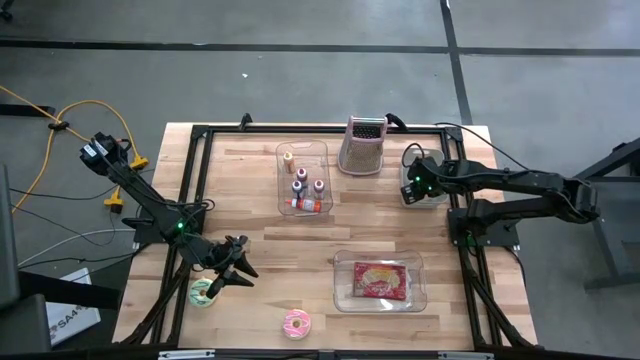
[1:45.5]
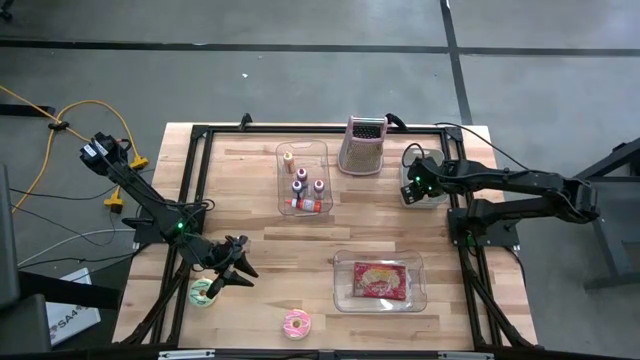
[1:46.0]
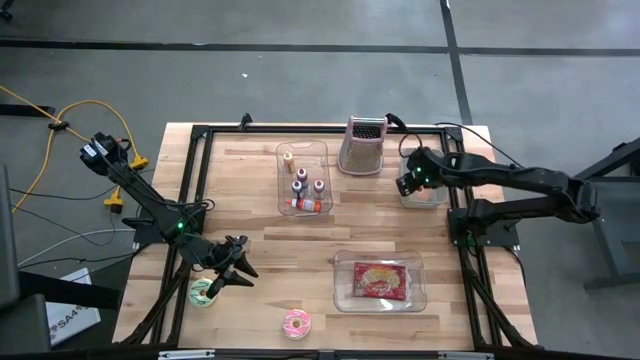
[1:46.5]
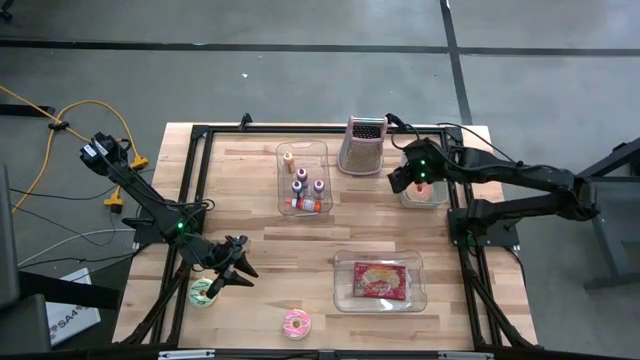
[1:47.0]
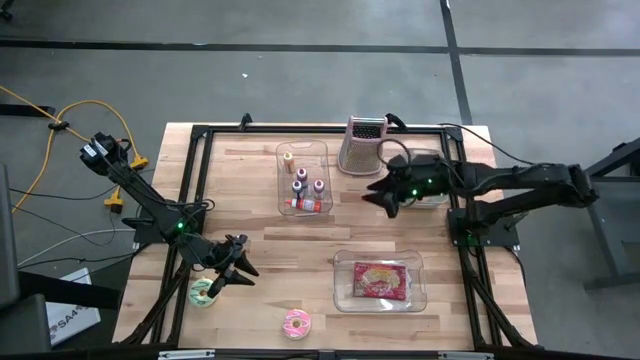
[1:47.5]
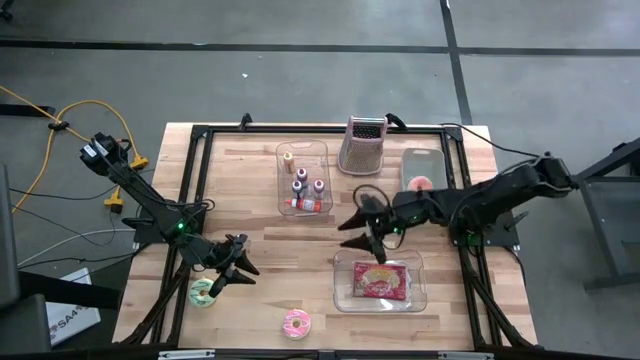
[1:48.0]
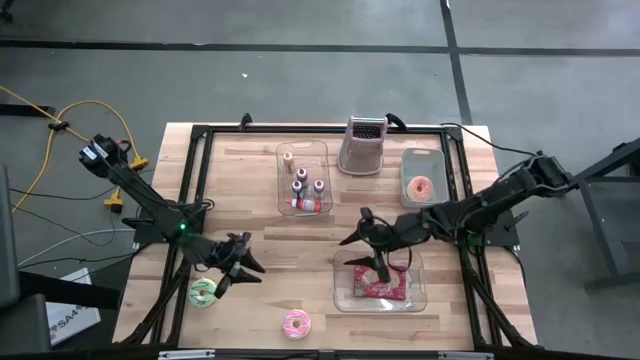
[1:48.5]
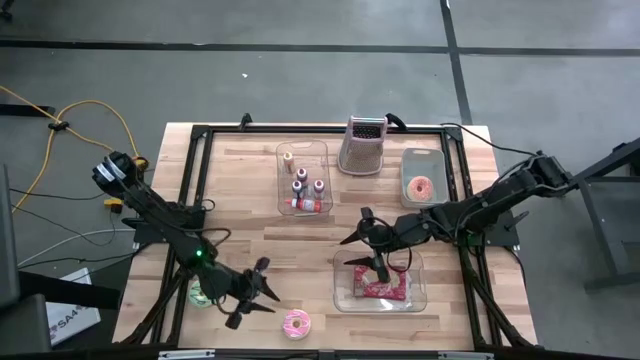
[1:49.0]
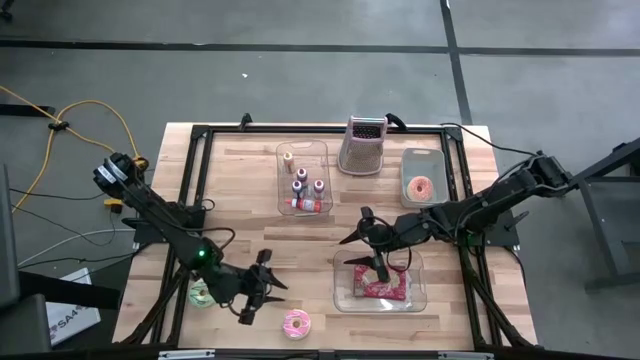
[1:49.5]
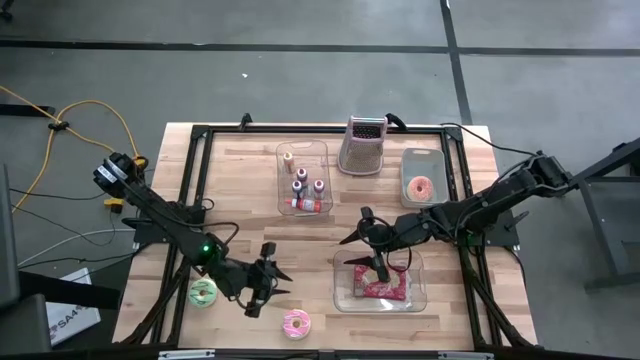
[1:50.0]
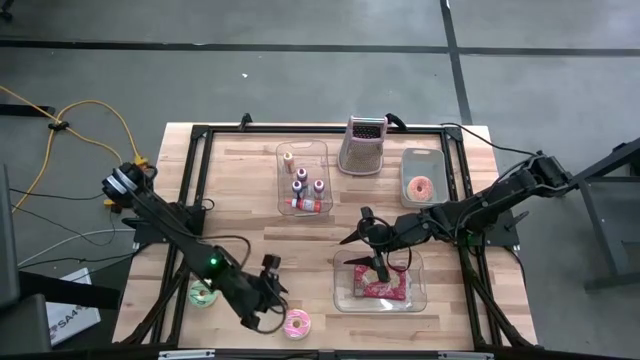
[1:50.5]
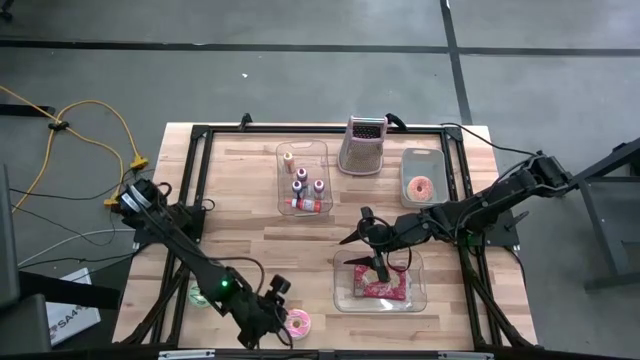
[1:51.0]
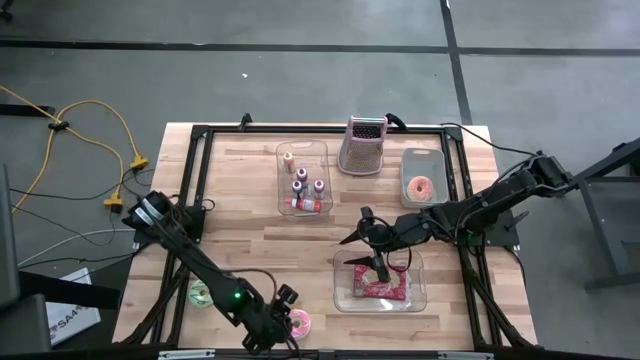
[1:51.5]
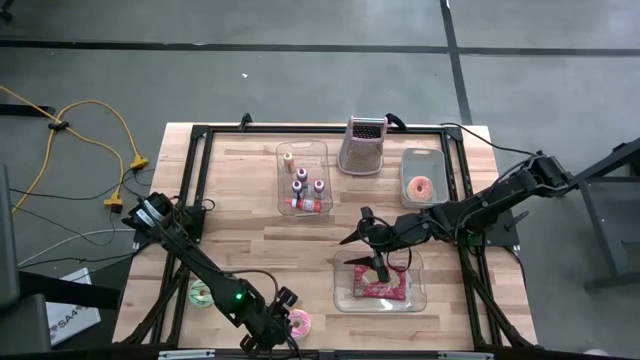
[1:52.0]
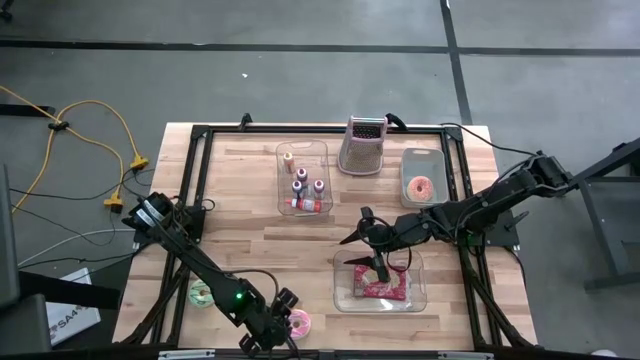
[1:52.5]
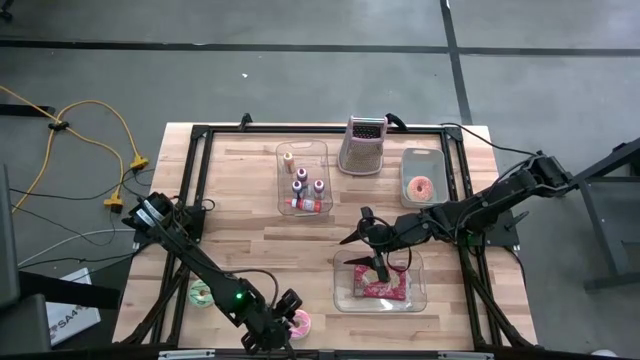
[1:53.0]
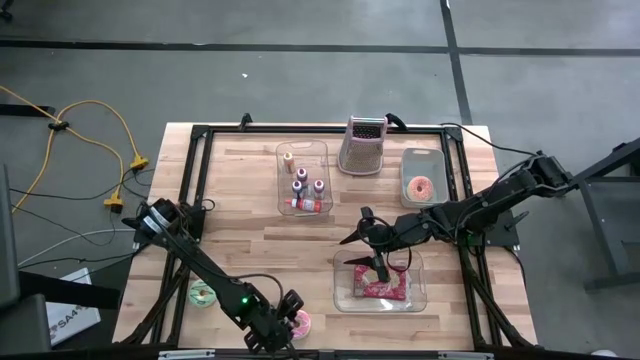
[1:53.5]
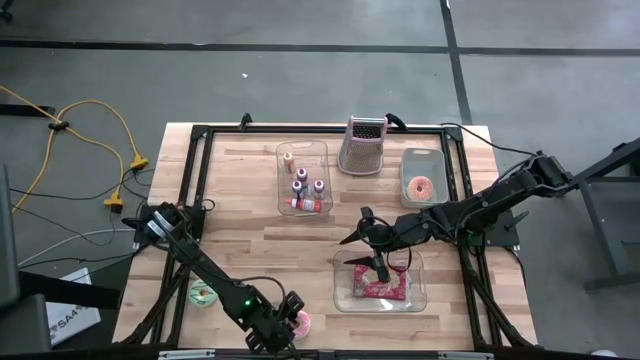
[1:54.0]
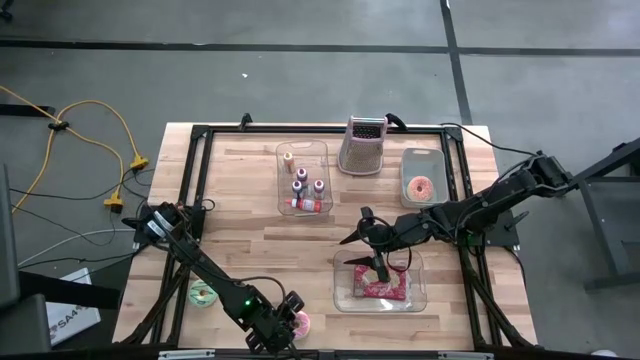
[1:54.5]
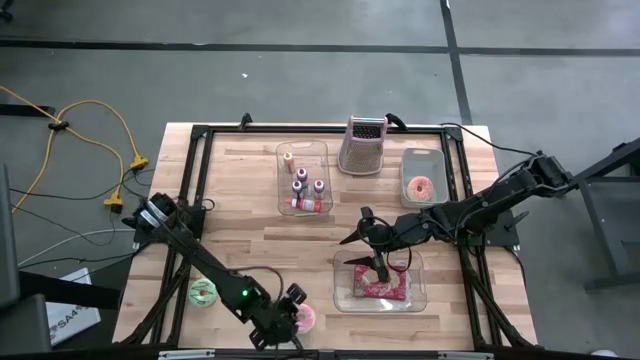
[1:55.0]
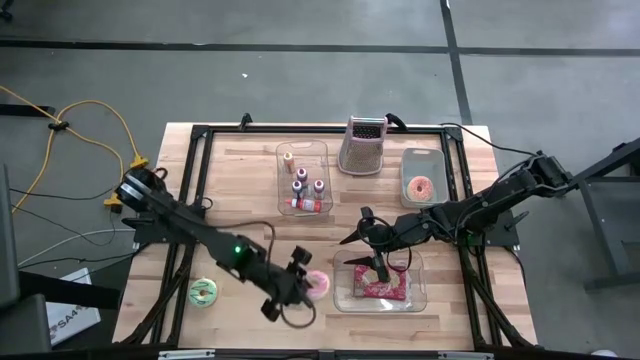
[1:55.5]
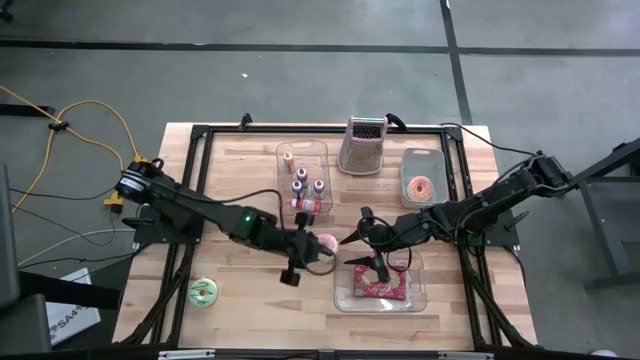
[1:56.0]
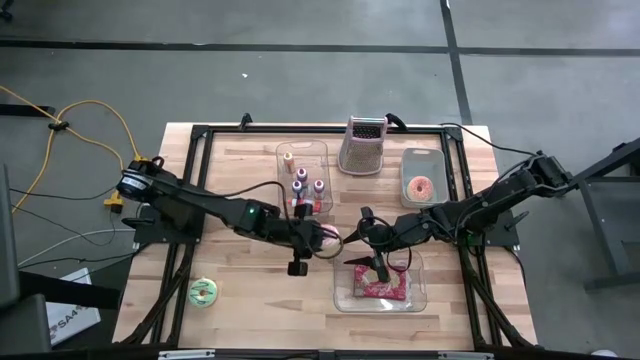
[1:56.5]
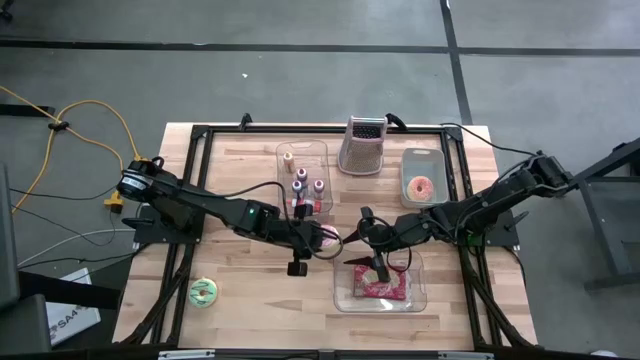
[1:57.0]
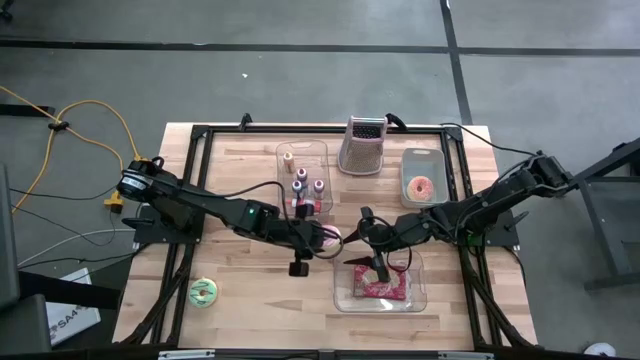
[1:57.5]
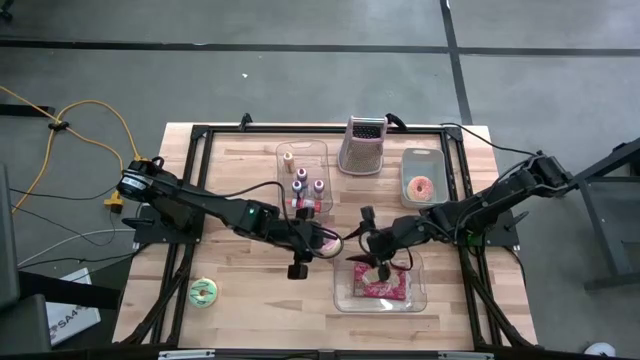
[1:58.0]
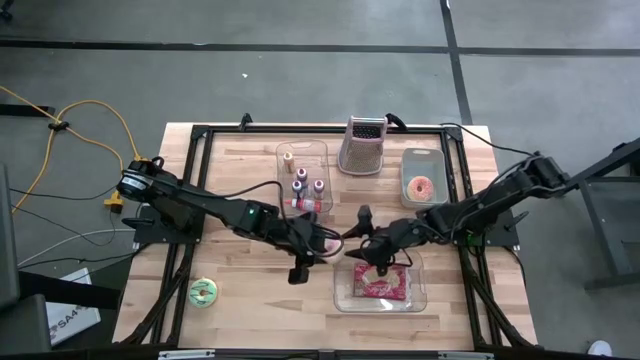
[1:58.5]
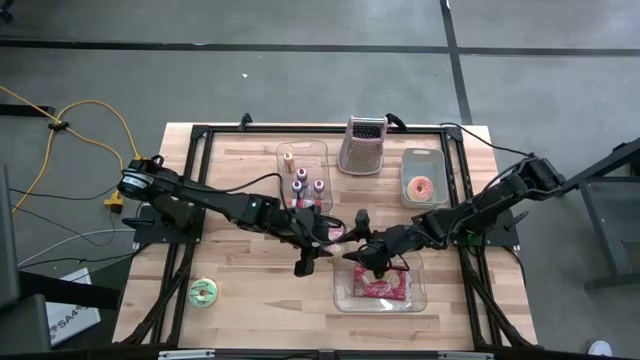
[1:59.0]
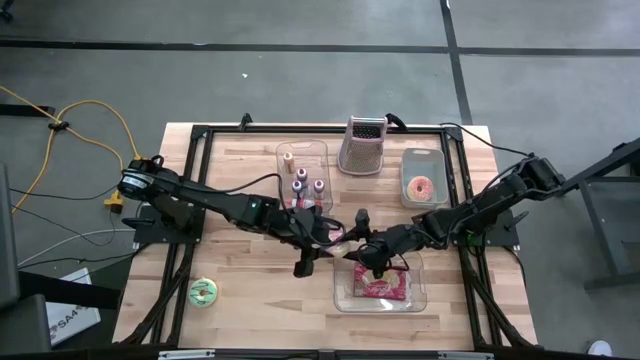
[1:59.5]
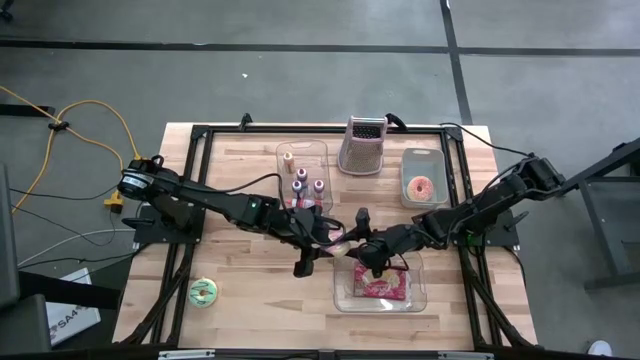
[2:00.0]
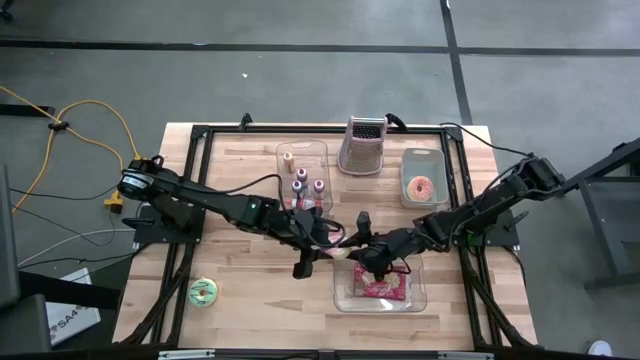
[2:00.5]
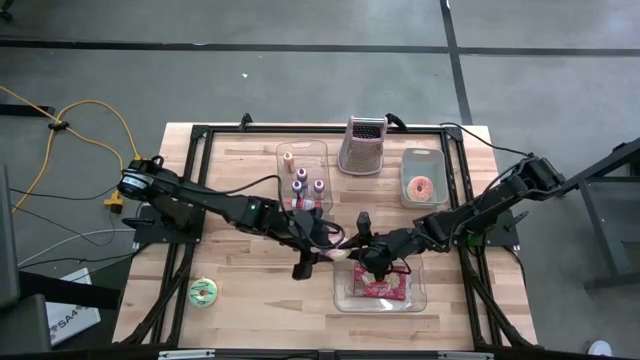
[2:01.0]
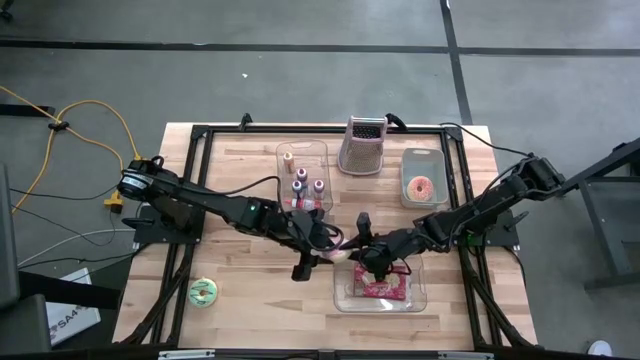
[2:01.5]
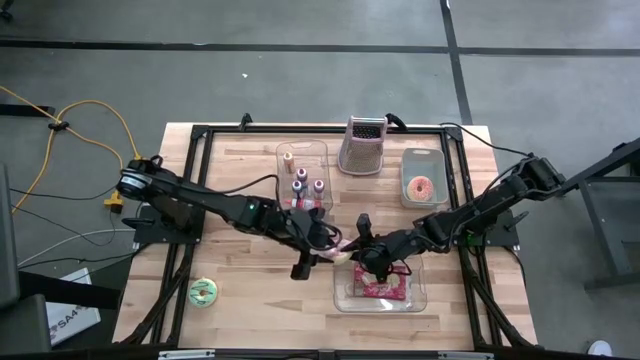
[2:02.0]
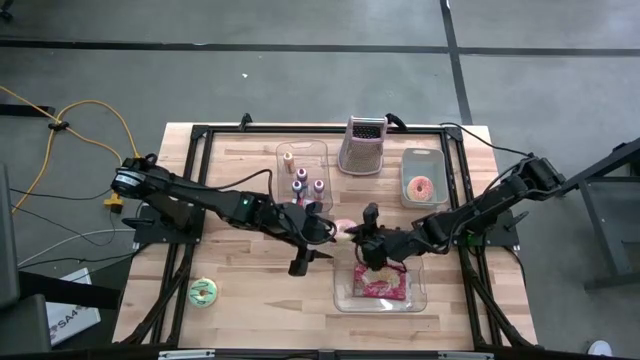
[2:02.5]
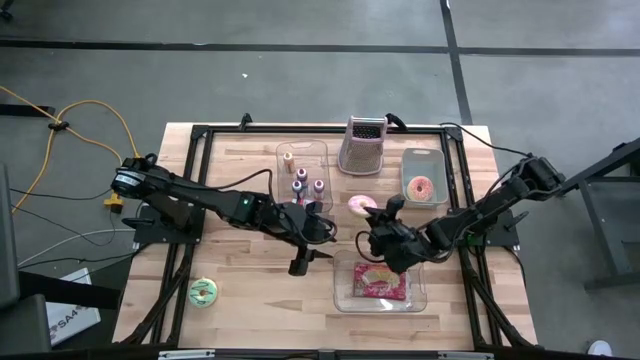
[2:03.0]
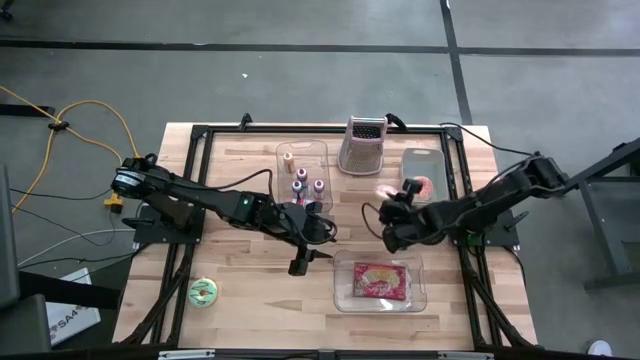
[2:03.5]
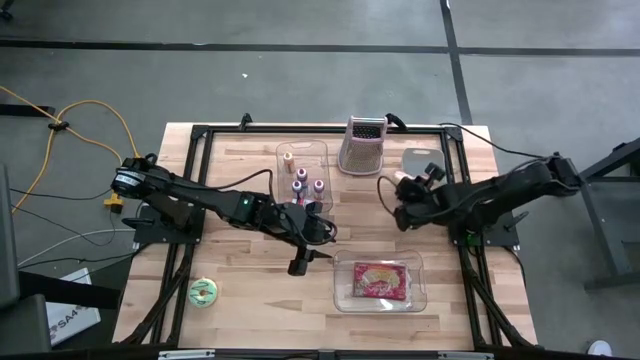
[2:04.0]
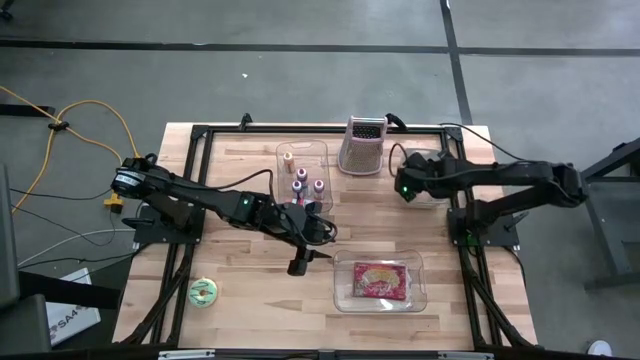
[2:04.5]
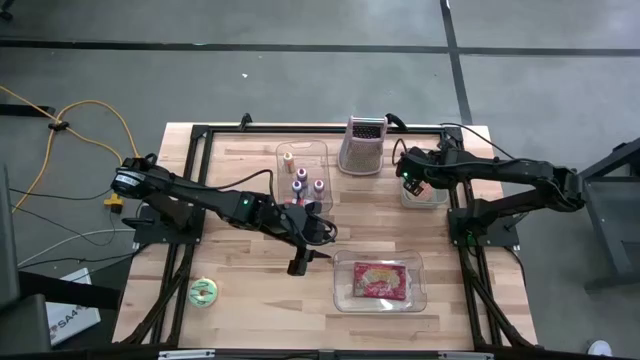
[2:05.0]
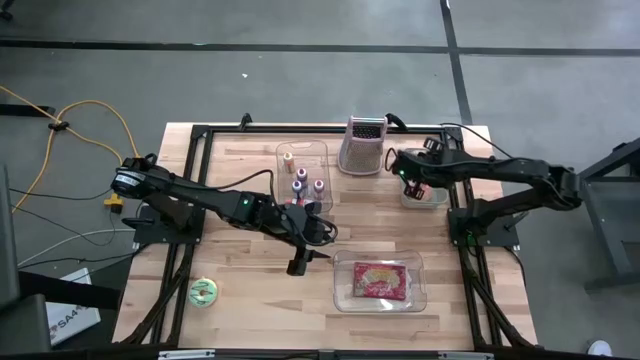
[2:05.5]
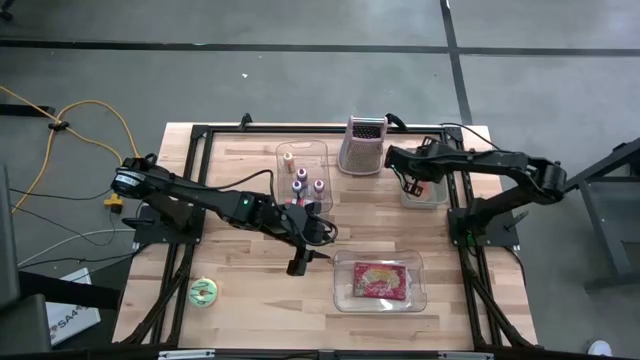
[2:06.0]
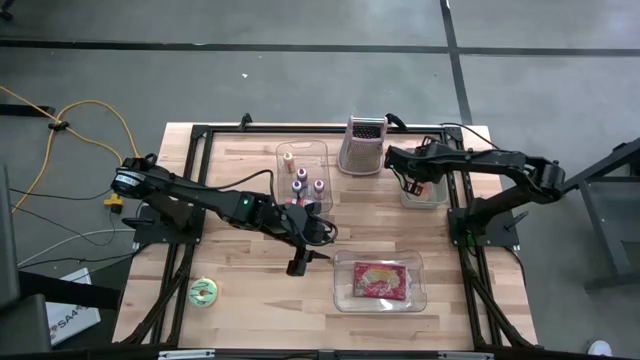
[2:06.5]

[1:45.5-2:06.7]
Put the pink donut into the gray bin
